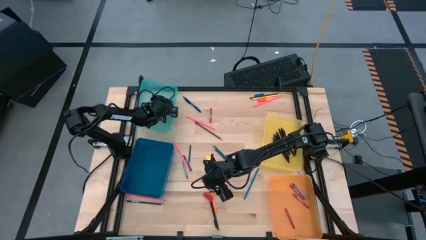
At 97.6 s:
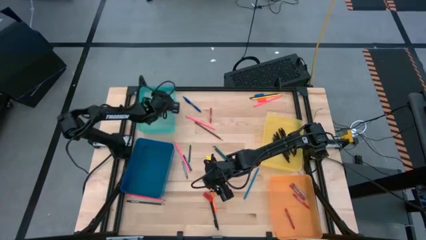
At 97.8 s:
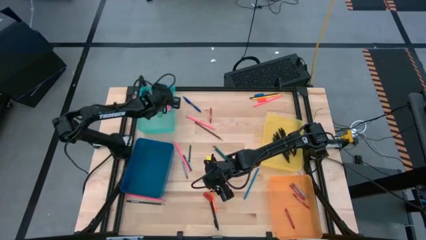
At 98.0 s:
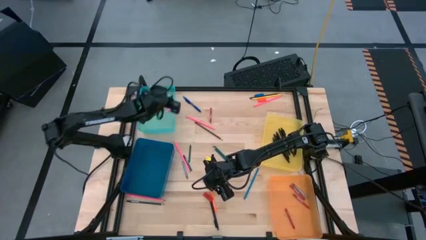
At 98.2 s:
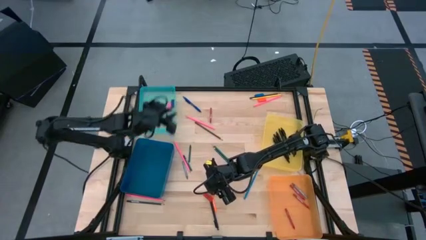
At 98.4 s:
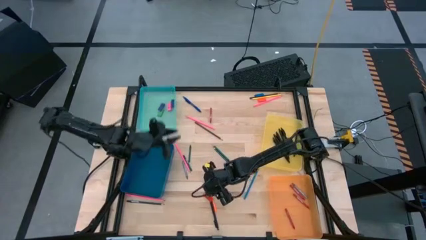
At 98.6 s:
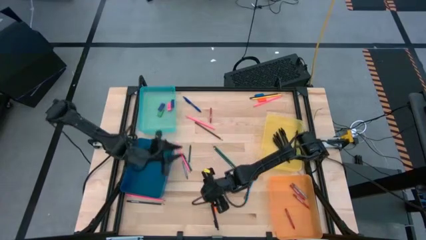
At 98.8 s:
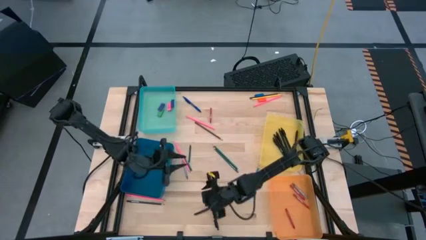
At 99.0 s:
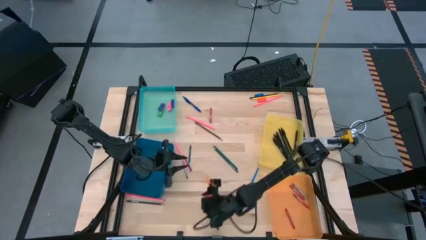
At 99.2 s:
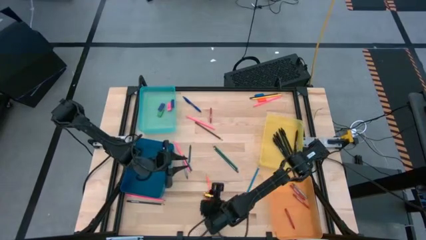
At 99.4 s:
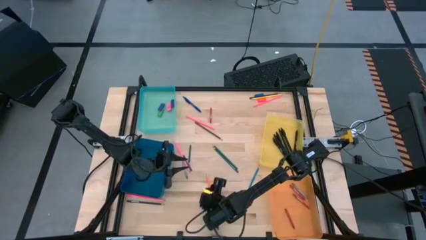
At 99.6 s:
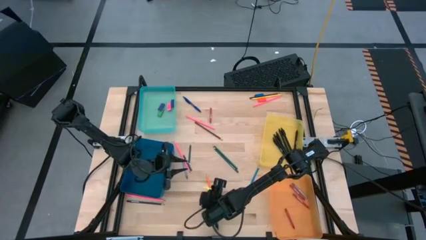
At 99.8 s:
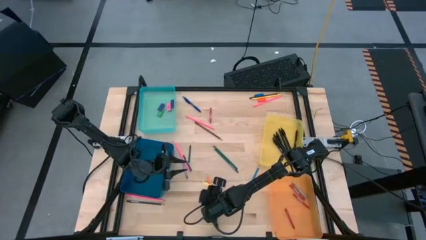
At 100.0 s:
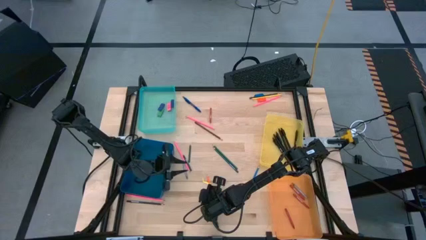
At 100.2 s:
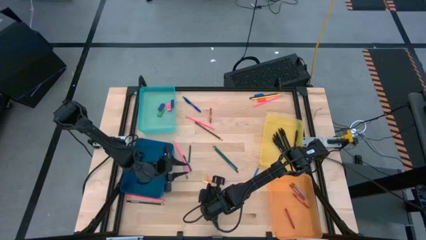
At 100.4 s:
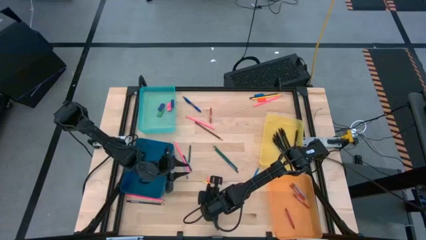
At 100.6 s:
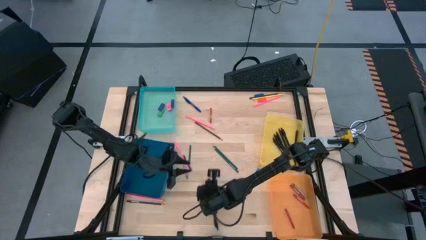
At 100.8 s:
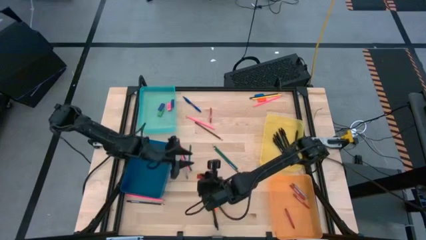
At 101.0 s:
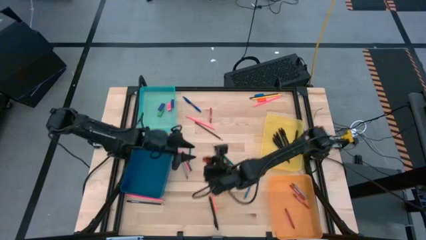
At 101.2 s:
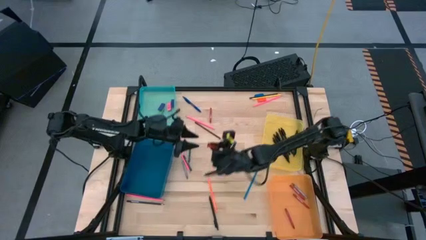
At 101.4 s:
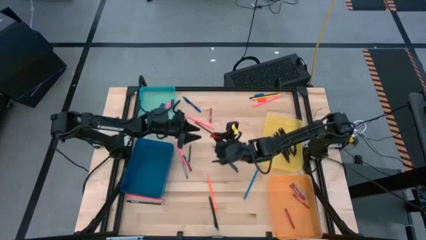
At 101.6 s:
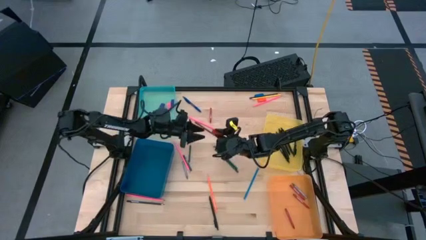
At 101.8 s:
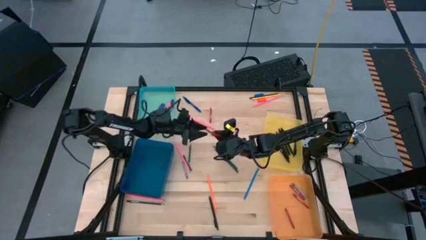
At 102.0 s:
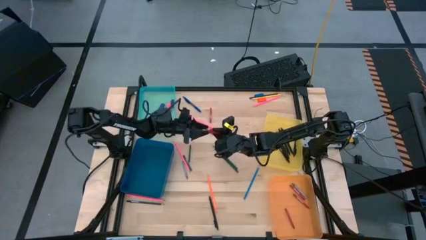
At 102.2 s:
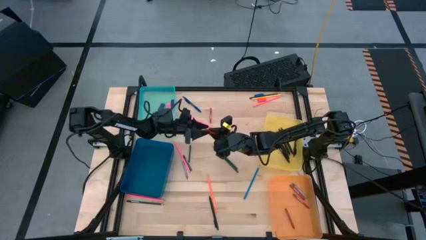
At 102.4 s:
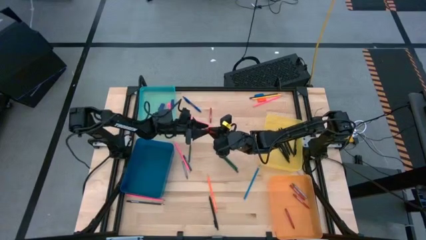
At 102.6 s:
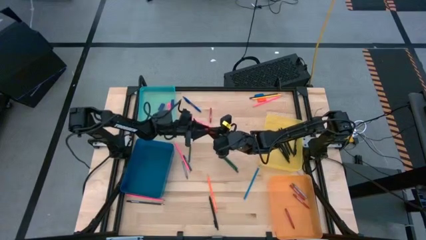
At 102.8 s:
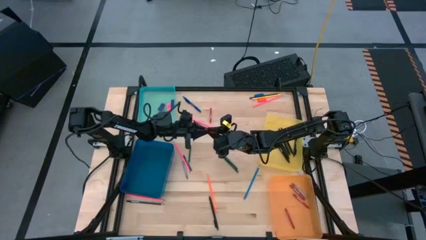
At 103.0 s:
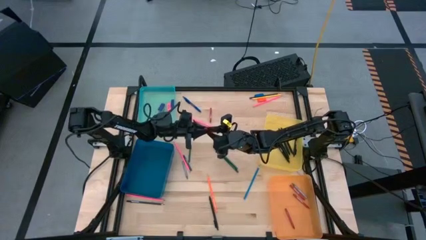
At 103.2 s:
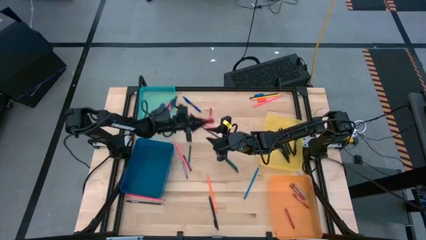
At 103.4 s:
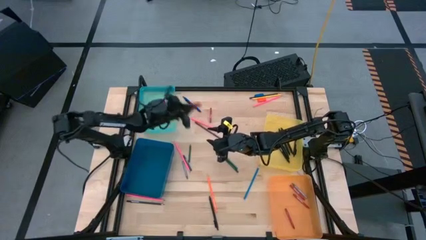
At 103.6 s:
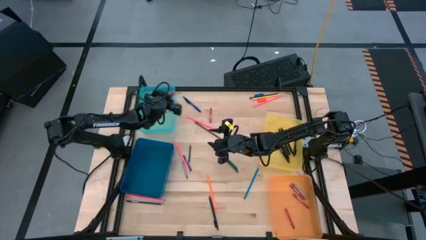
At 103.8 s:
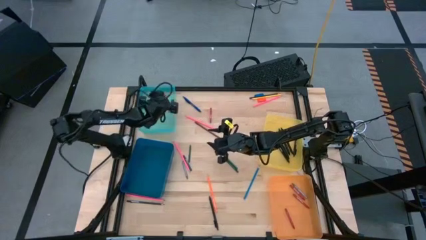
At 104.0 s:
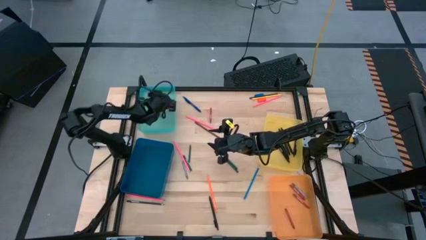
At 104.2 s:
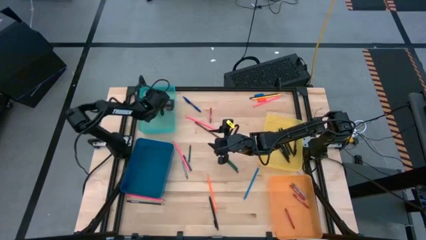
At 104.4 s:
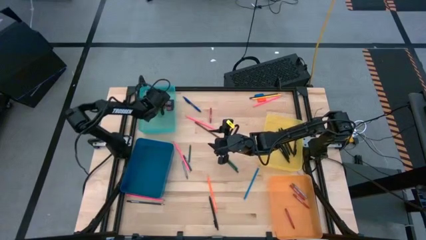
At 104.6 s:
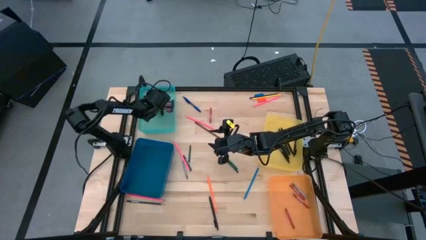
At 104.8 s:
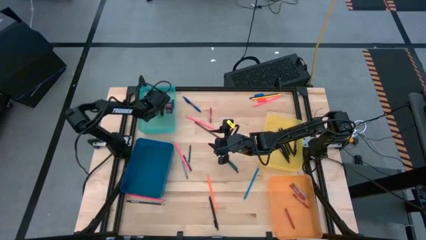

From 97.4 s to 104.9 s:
Task: Sort crayons/erasers/pens/pencils in bins
Put the red eraser into the light blue bin

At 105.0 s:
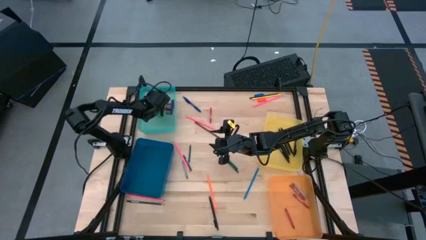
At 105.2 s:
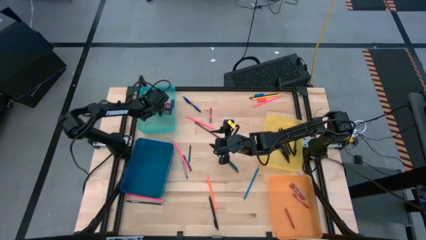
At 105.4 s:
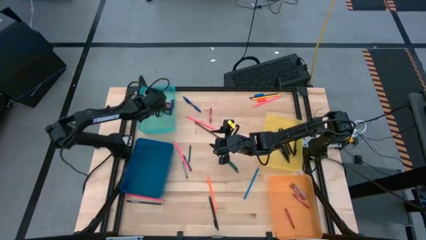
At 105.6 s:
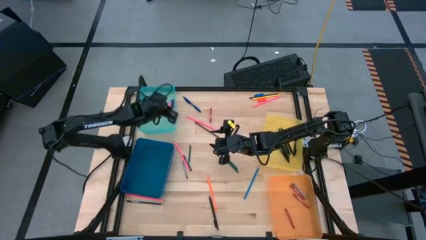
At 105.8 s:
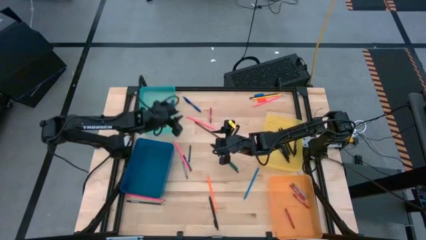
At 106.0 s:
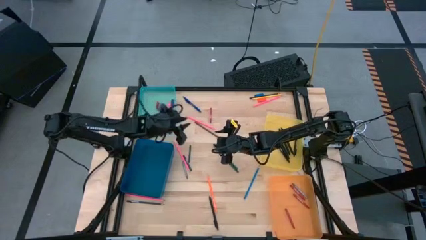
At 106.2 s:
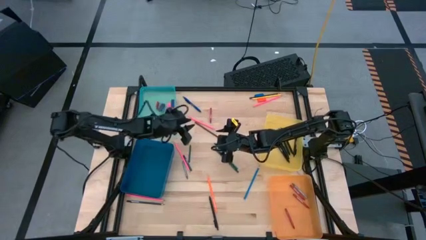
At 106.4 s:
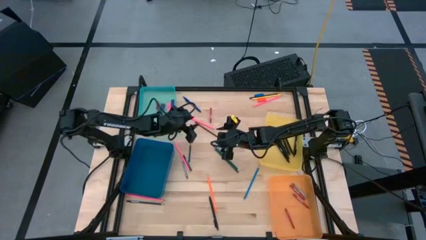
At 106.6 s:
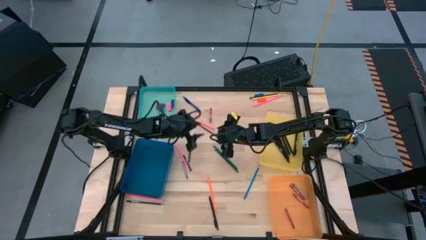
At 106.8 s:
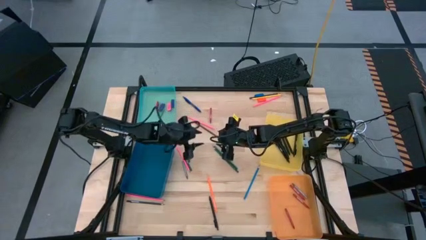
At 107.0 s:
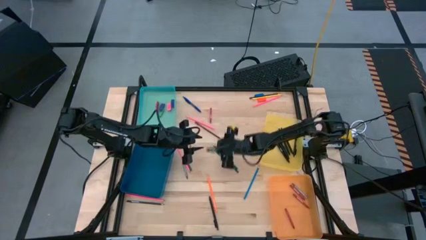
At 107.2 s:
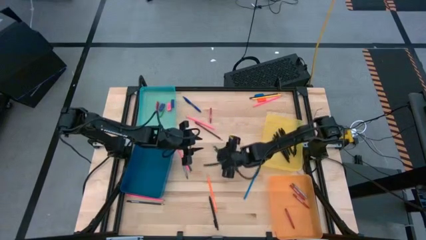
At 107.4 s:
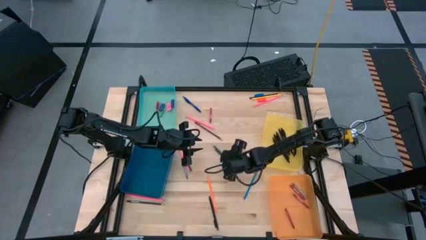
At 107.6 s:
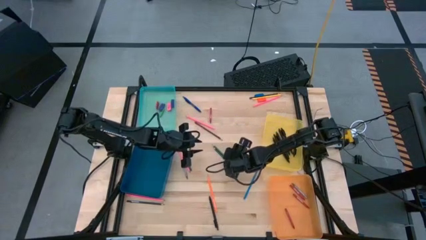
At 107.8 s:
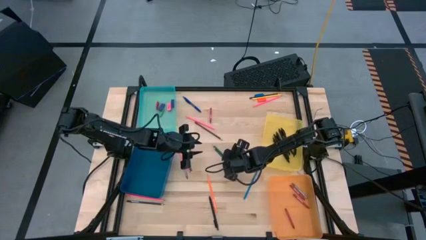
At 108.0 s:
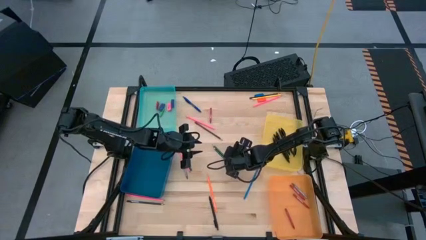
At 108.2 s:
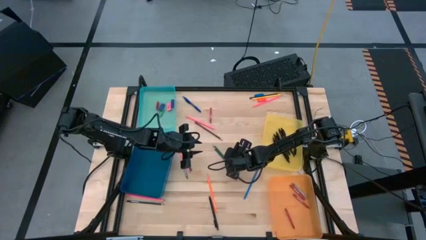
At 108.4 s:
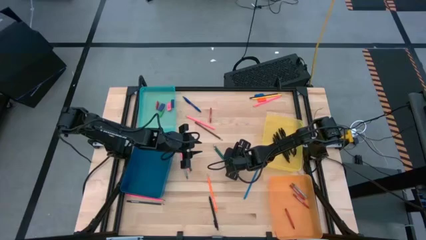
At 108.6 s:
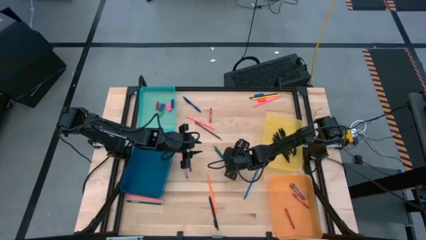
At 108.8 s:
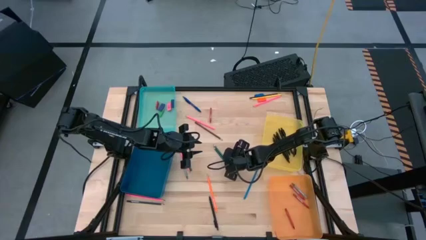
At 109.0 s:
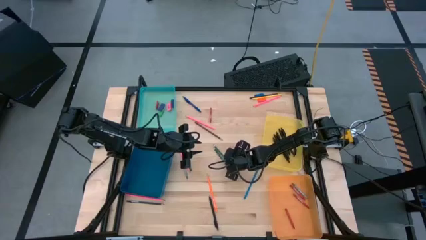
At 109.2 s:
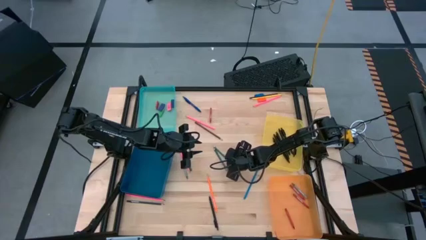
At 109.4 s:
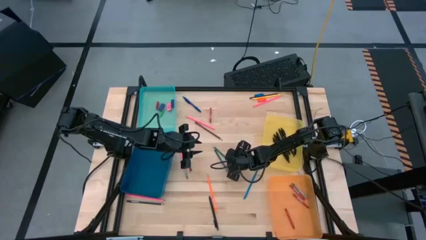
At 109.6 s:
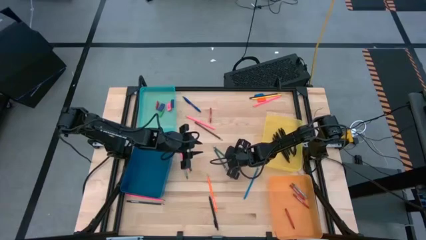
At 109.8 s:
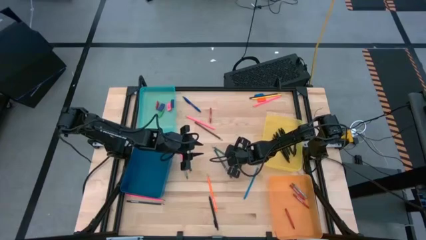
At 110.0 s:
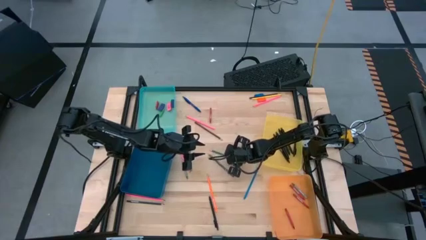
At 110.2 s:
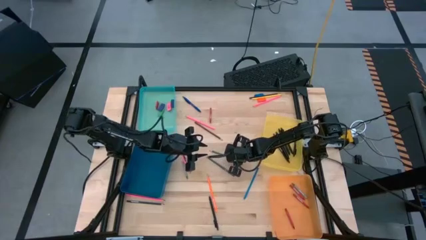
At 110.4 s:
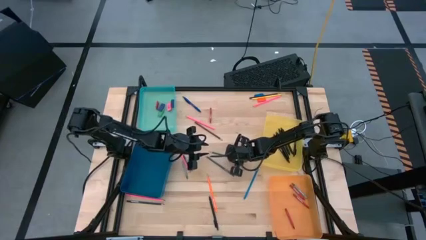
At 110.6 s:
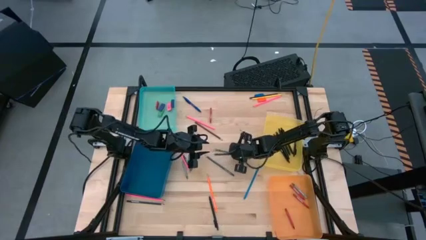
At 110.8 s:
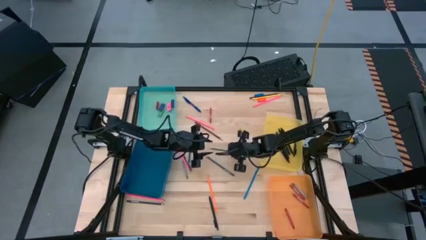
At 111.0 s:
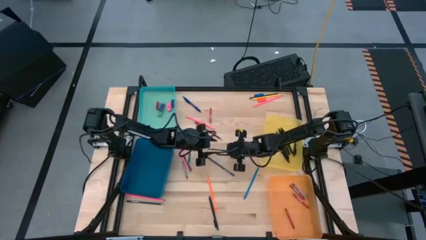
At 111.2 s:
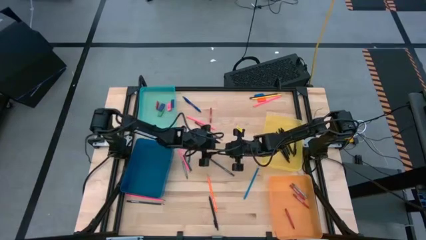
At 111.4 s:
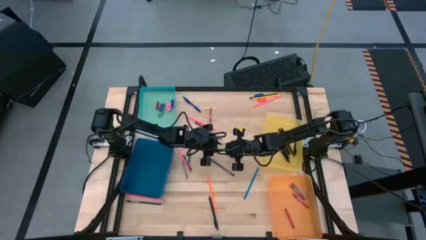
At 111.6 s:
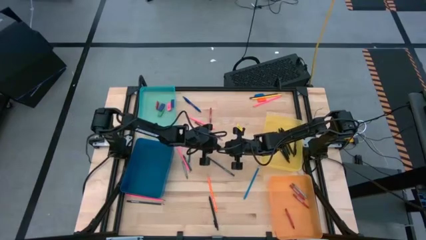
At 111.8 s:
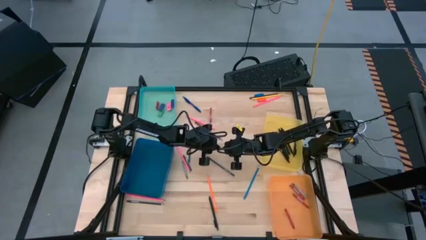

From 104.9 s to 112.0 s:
Put the green colored pencil into the blue bin

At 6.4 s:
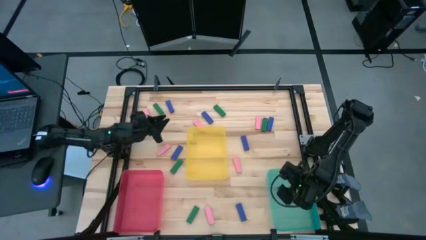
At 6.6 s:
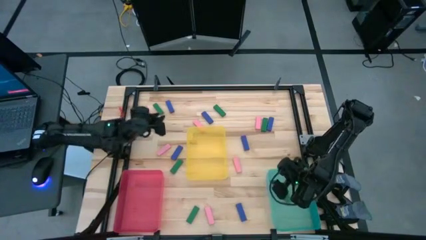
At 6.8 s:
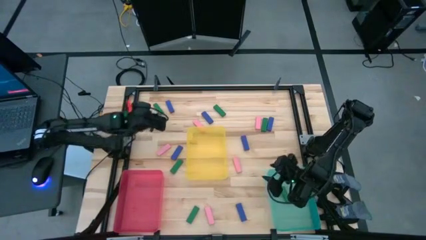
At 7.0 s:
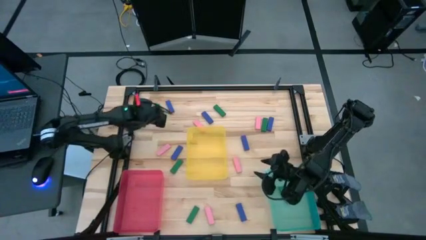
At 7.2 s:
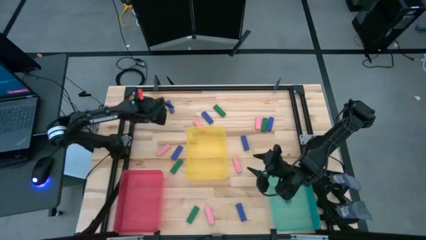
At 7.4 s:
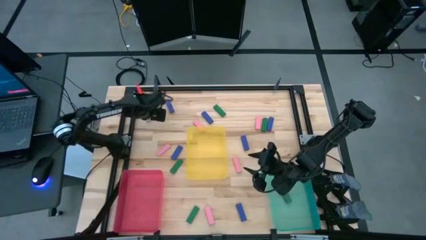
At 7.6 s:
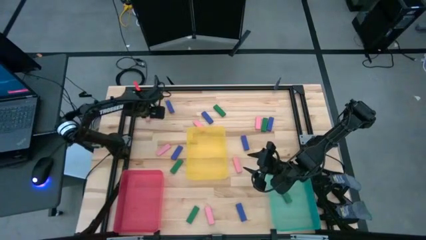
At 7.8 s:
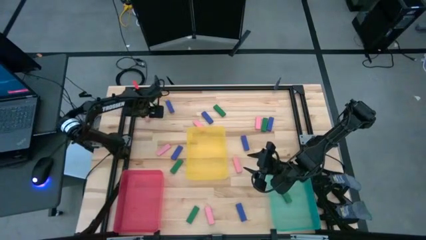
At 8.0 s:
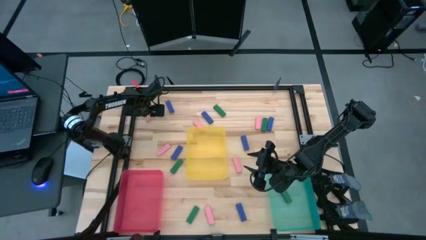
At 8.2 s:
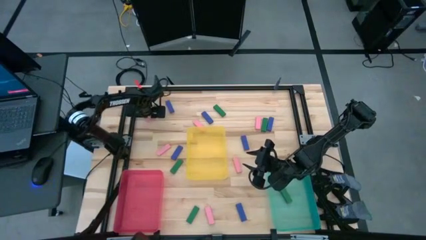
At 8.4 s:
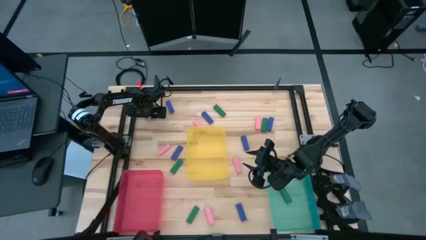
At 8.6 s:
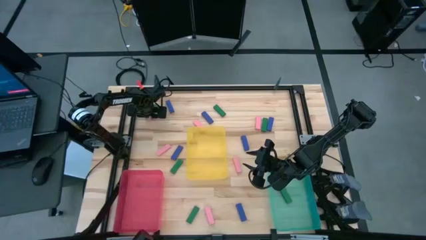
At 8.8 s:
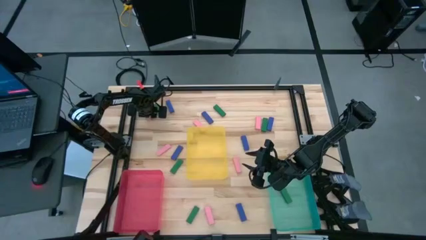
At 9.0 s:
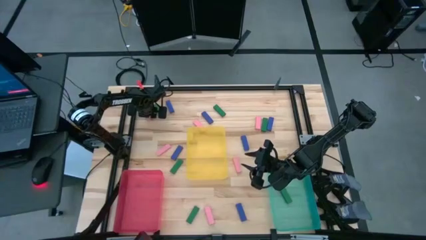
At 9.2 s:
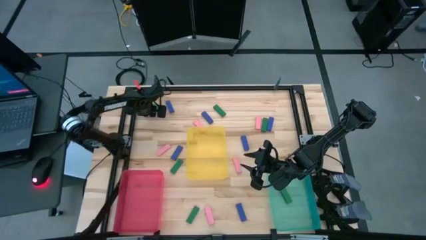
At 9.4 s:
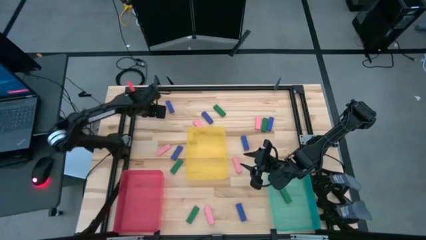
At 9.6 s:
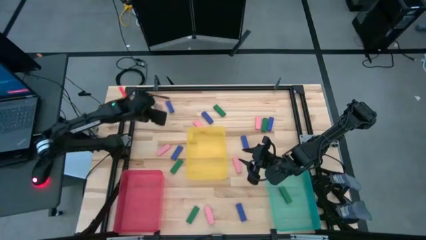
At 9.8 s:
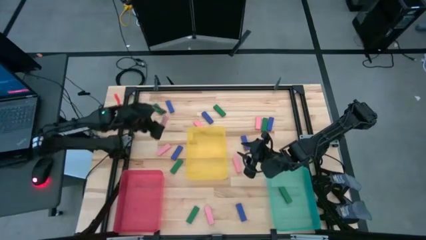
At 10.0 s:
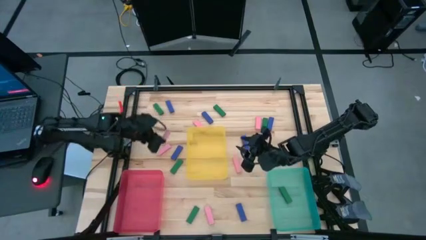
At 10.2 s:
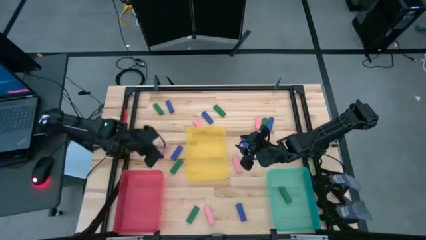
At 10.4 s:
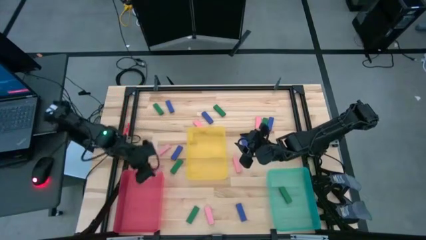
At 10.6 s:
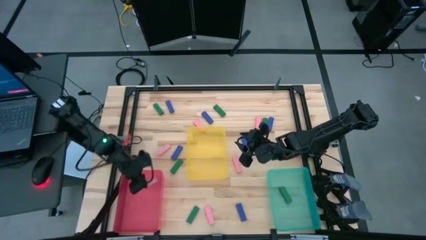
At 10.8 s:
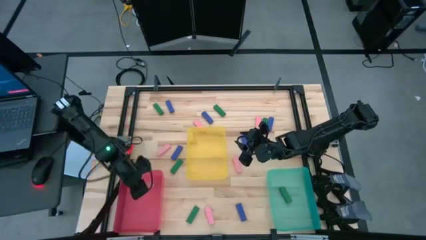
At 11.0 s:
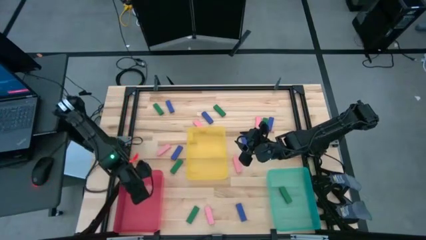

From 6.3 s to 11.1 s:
Task: Sort blocks
Put the pink block into the red bin
